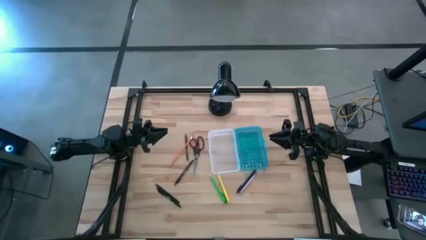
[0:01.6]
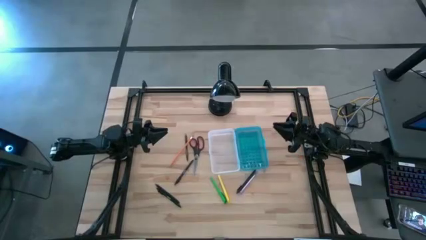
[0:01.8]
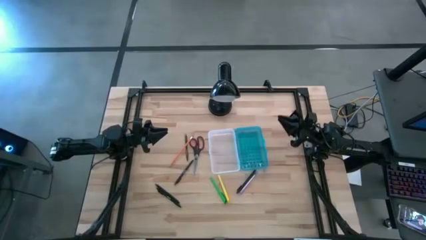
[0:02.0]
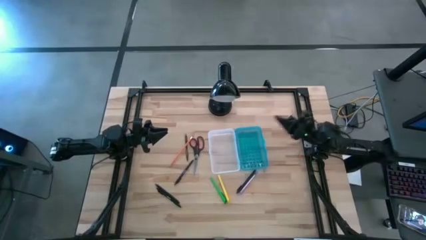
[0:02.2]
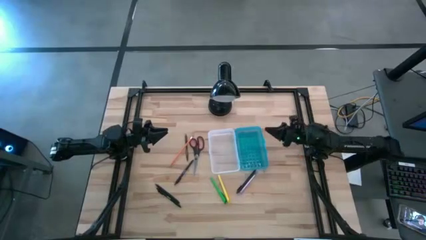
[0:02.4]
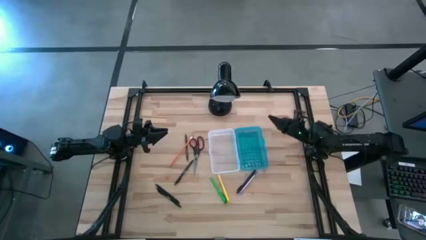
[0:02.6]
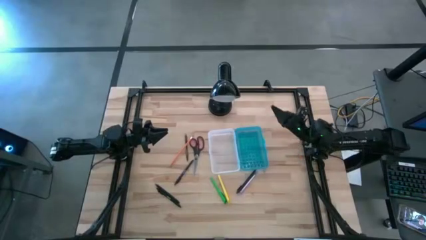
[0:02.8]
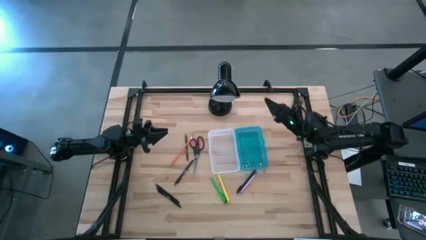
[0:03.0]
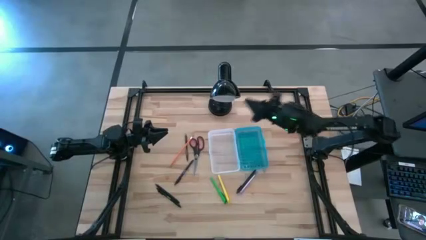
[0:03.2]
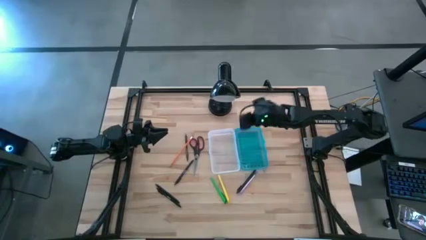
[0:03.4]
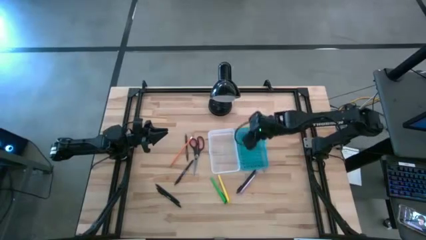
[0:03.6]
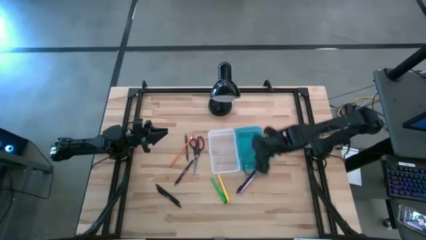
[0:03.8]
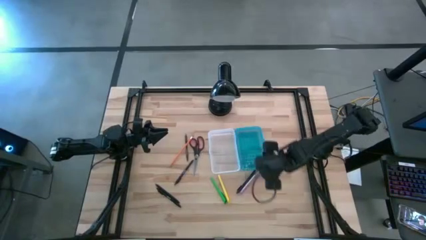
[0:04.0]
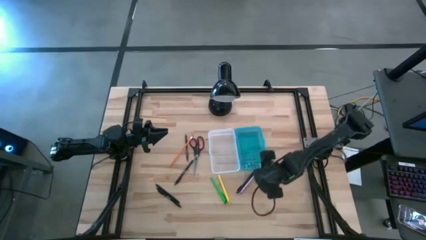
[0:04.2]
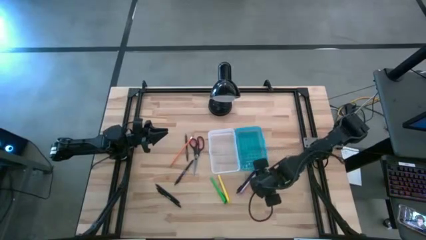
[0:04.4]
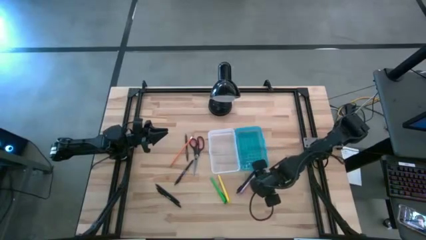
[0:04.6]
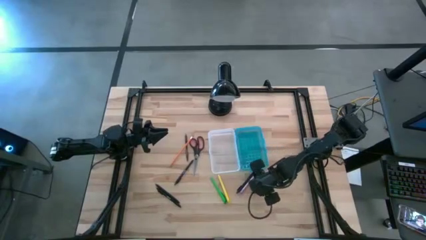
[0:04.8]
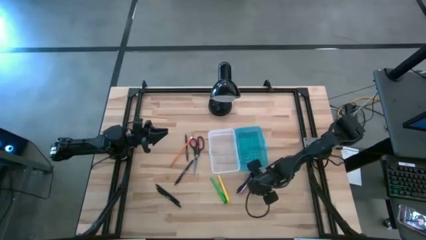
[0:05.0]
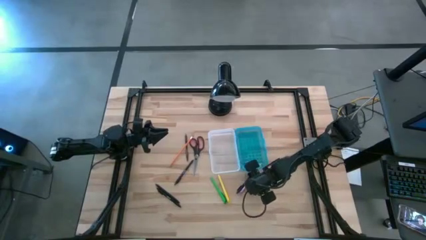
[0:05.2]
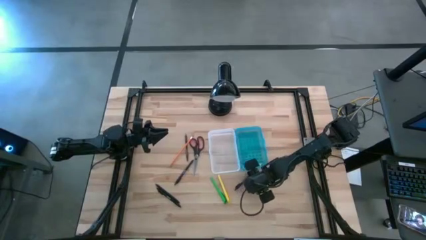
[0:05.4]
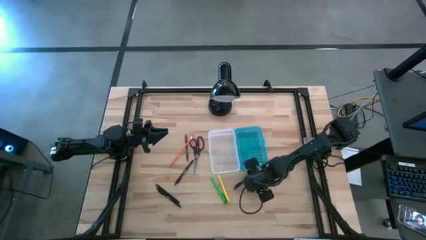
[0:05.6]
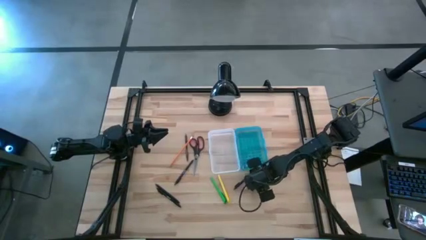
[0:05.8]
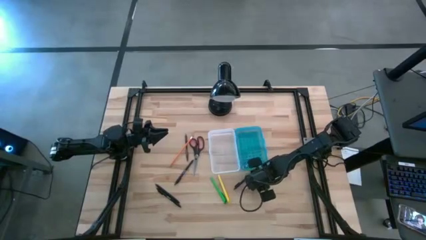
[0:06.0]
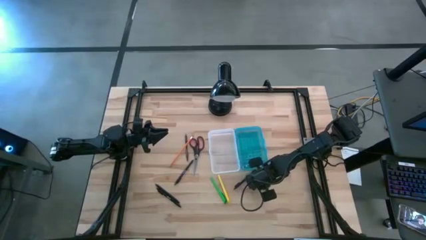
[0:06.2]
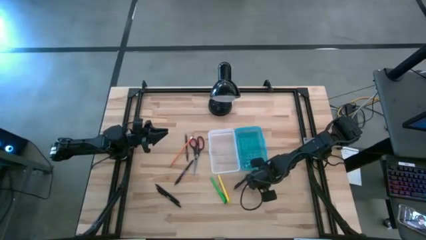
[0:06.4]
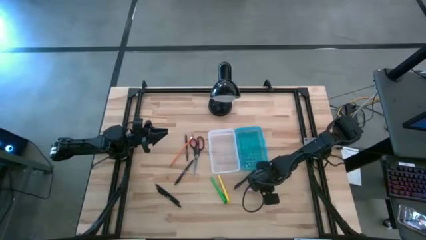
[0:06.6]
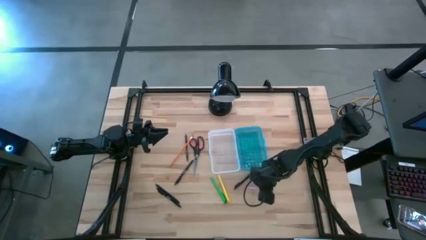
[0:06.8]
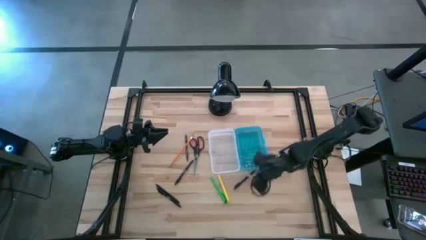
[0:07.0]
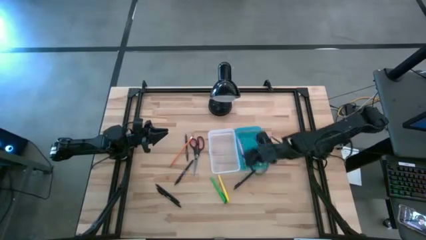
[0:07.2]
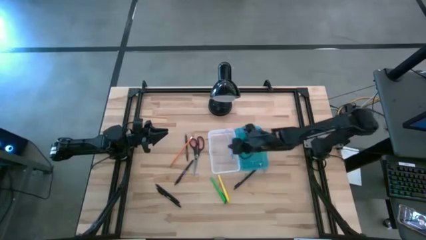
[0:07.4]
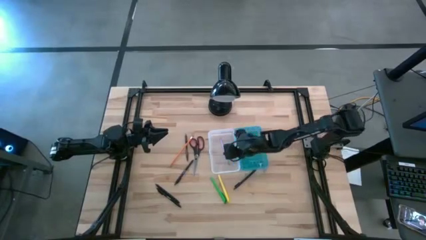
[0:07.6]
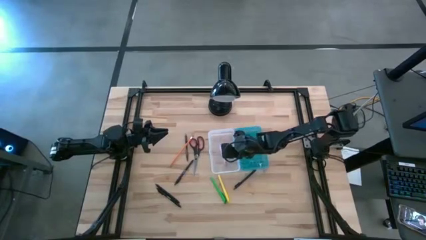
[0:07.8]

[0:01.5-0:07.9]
Task: Pick & place school supplies into a supply box
Put the violet pen into the supply box

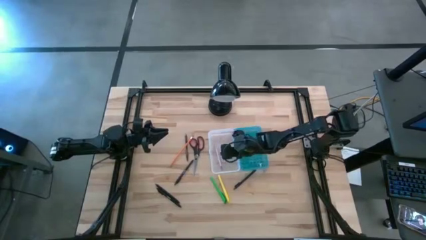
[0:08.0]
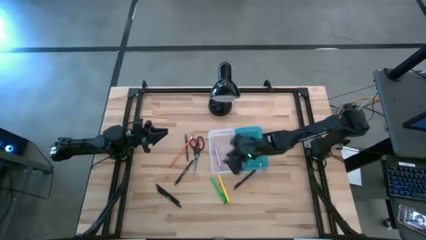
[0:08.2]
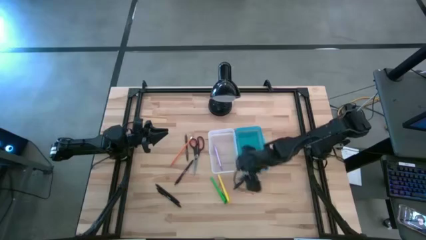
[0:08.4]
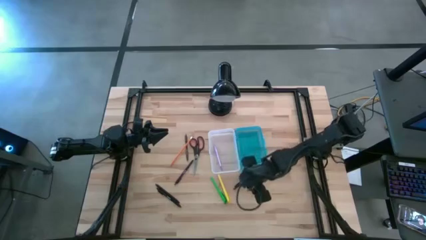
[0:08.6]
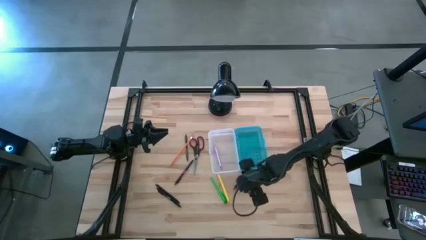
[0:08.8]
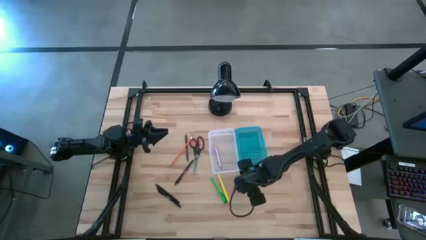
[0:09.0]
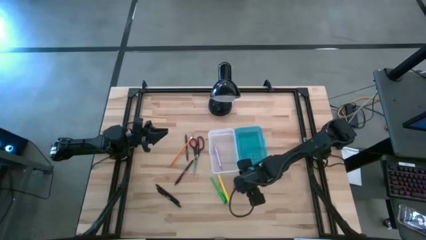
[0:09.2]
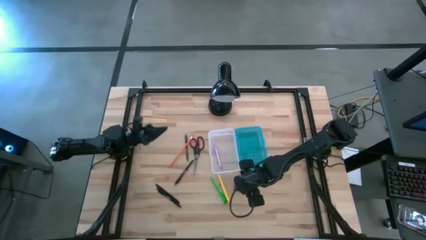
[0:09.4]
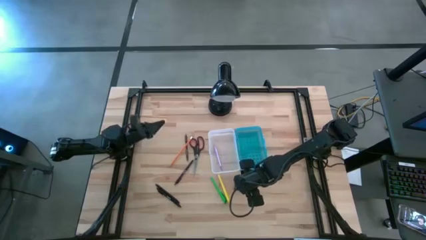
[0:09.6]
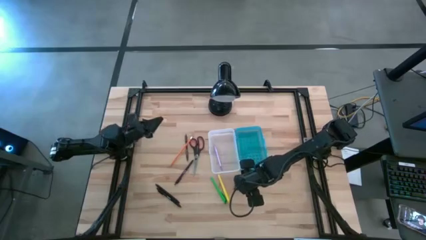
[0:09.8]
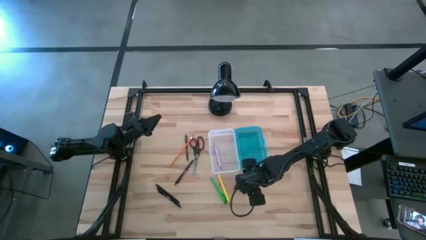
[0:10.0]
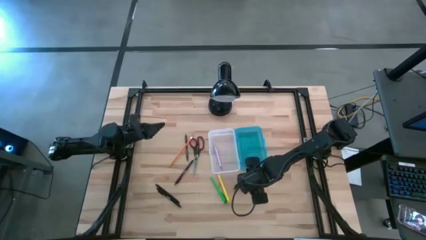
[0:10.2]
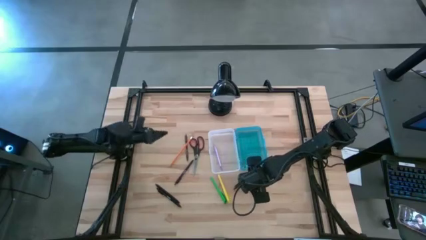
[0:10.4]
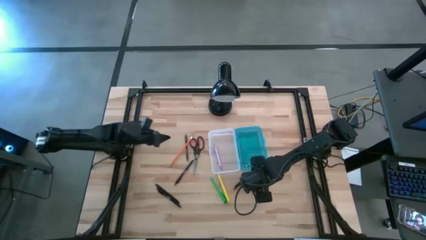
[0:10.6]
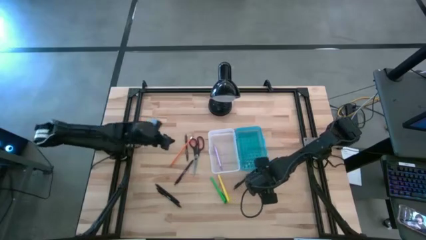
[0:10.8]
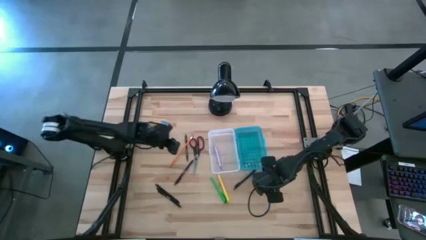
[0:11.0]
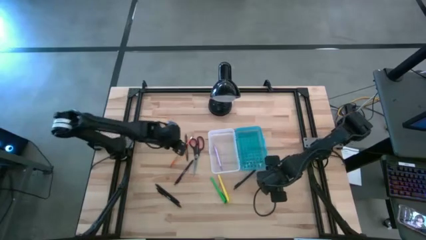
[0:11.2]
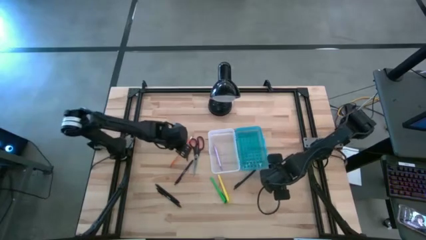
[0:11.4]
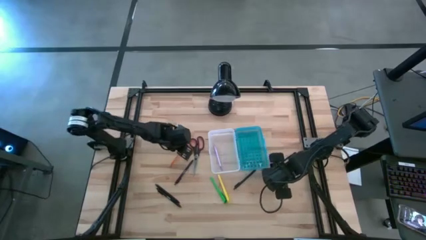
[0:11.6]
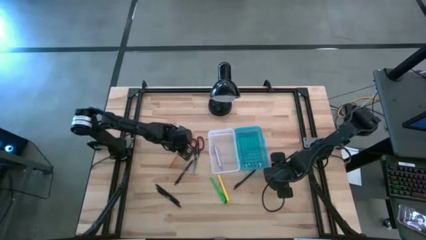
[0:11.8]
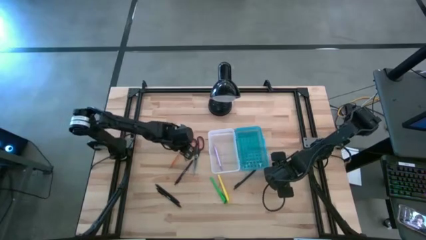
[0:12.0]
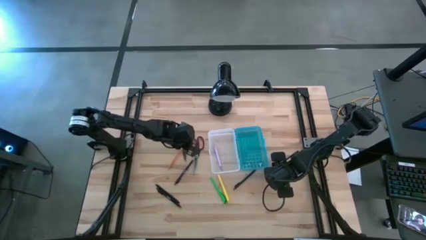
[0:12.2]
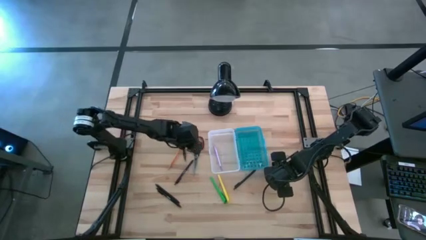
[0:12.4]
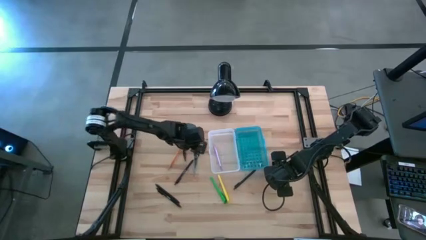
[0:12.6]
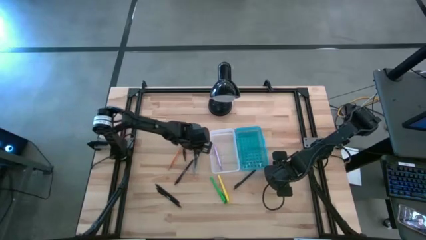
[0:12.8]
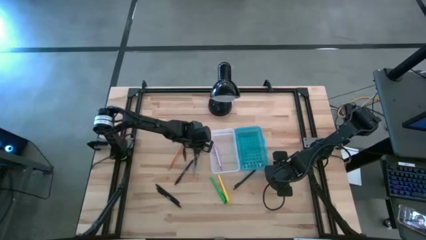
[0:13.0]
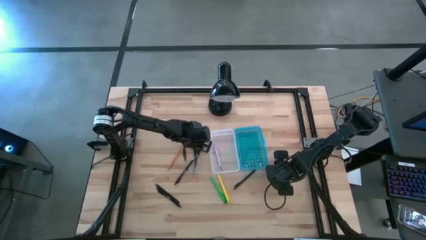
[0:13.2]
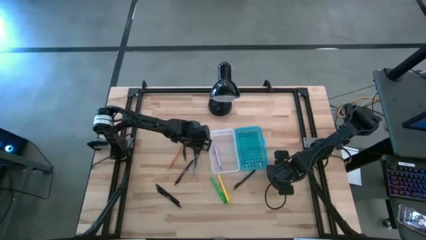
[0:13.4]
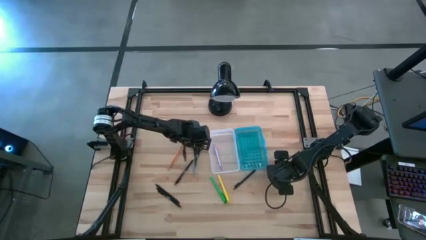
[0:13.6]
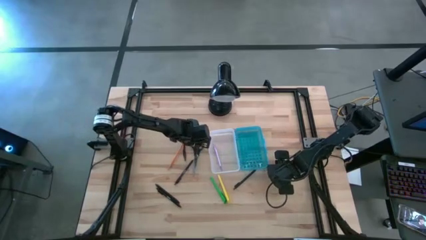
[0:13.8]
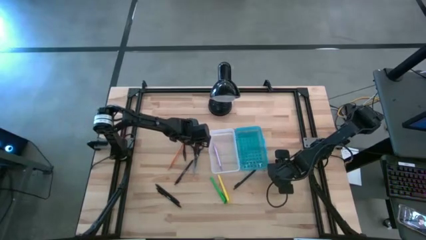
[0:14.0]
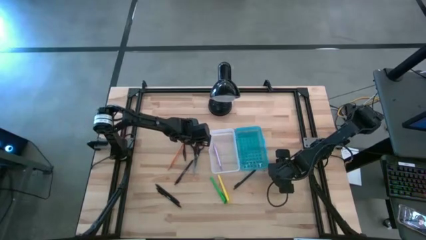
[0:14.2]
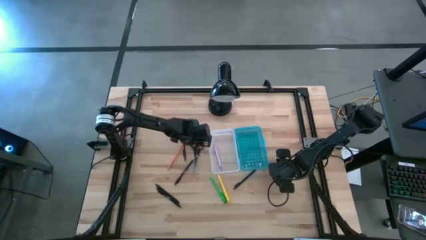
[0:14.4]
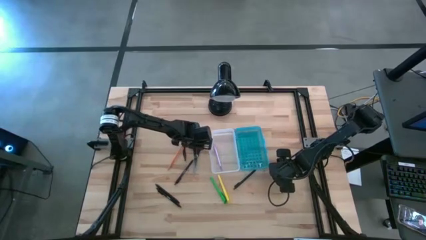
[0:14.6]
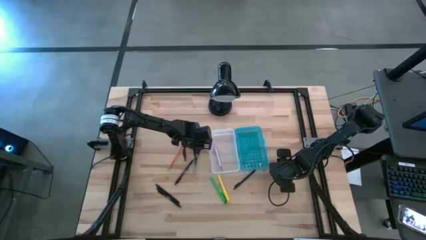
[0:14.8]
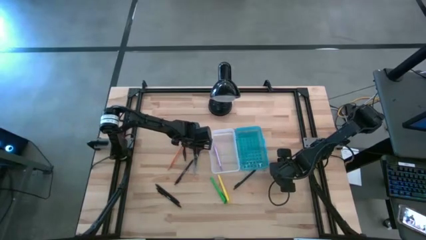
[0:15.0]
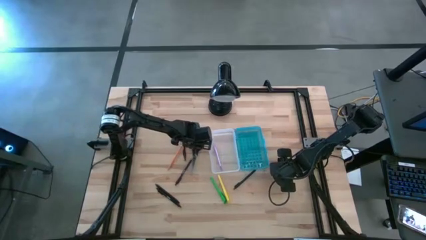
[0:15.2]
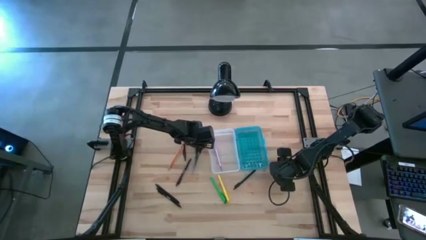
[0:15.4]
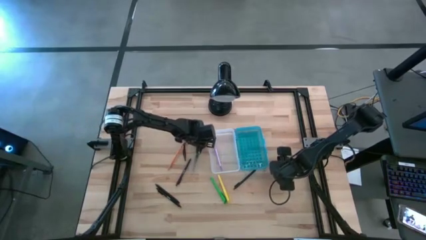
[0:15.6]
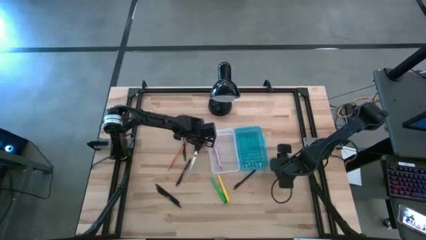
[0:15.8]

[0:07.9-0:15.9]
Put the black and orange scissors into the supply box

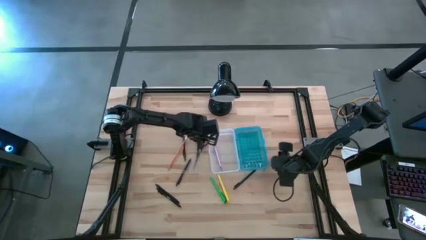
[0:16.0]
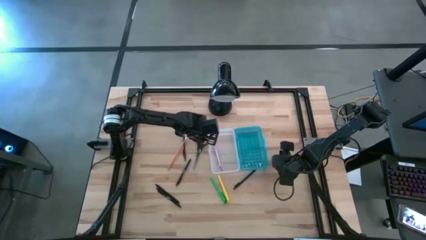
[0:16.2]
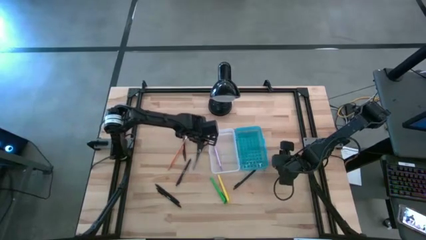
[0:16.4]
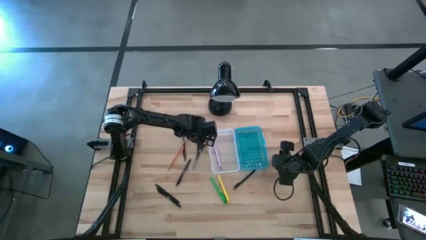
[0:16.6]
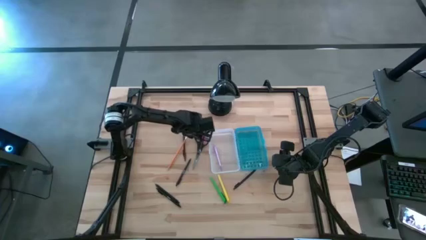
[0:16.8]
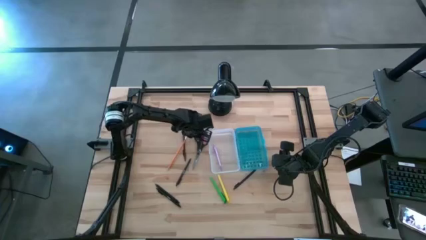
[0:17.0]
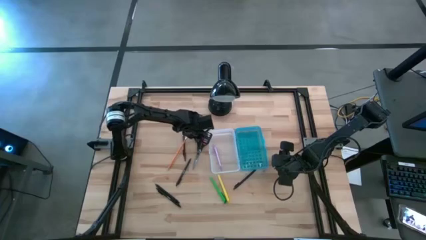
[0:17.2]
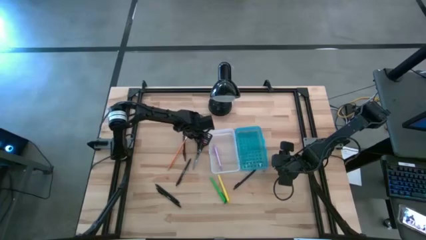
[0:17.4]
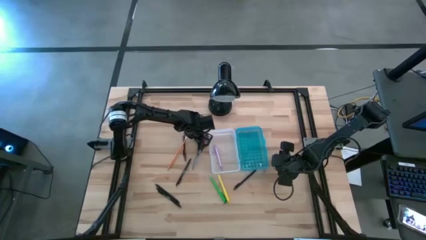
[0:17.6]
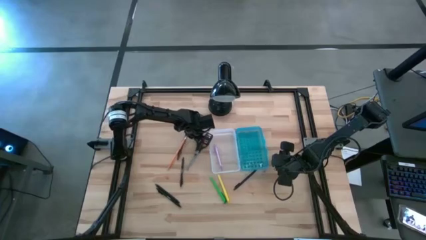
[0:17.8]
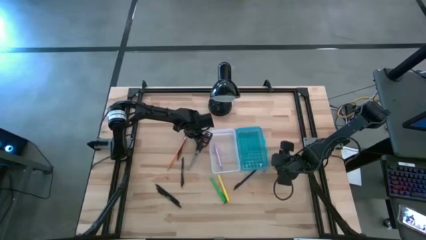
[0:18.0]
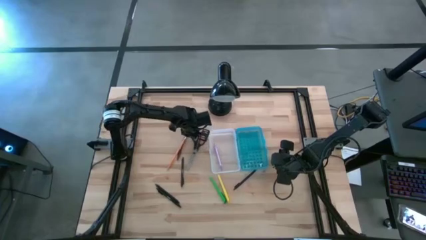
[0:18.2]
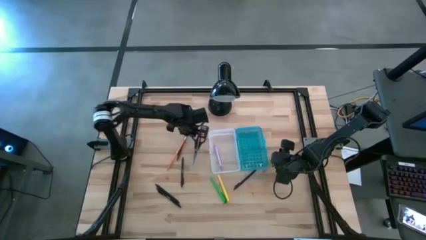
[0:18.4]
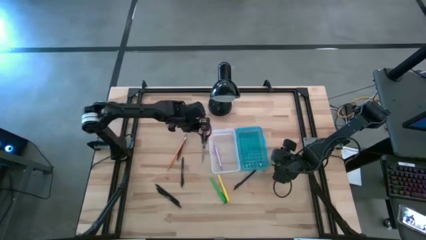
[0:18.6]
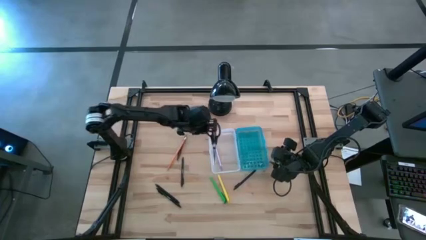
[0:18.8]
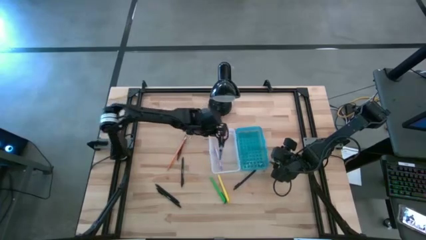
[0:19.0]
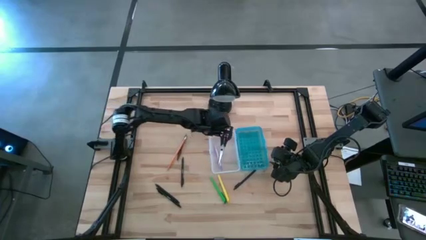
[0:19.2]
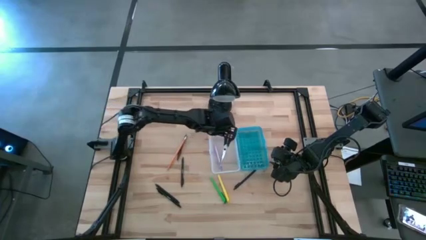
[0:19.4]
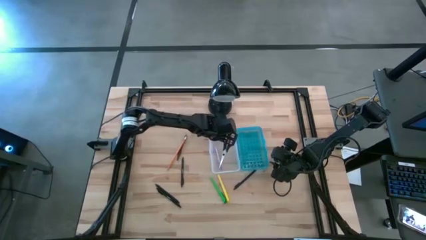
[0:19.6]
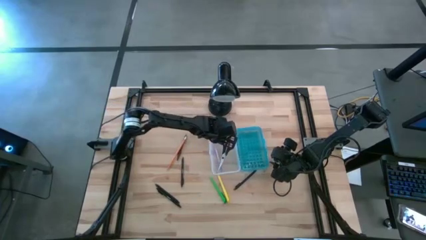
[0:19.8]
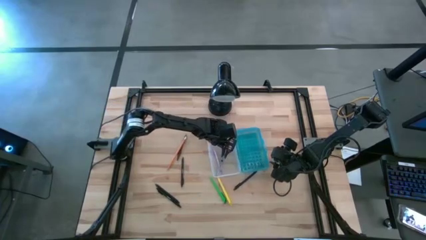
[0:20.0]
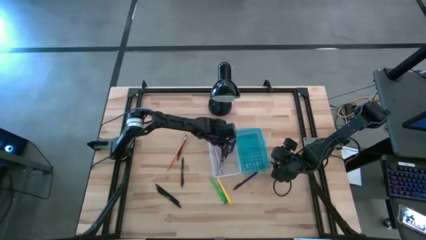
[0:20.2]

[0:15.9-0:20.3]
Put the black and orange scissors into the supply box
